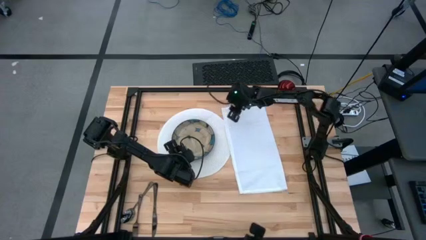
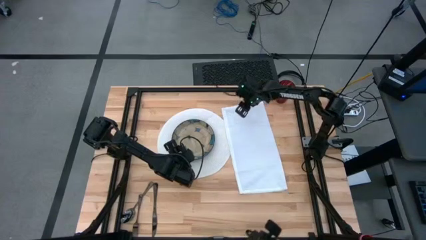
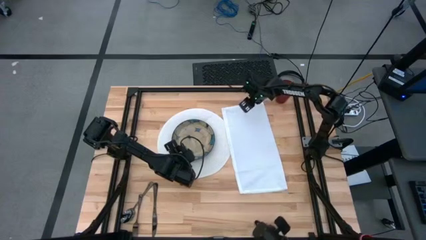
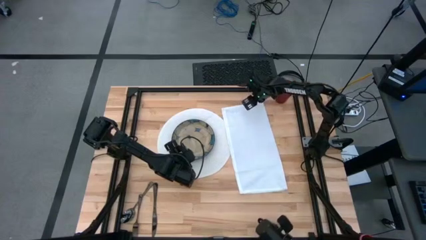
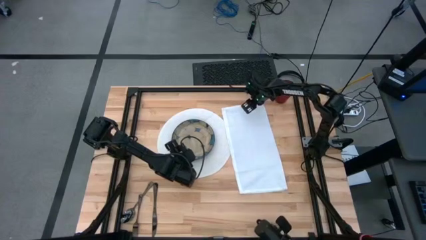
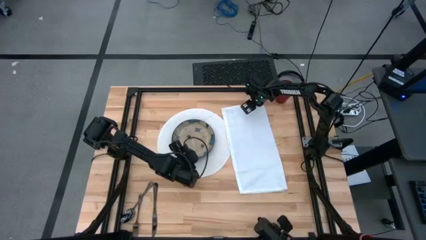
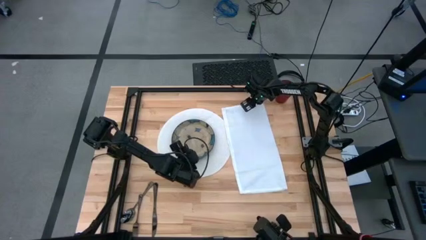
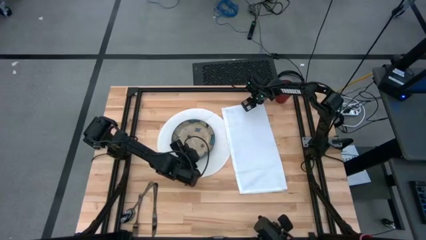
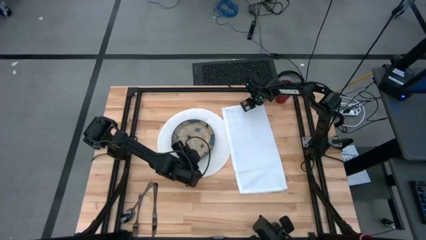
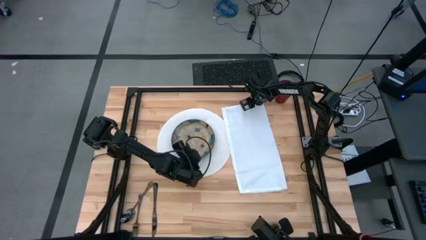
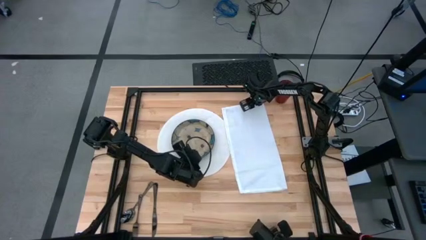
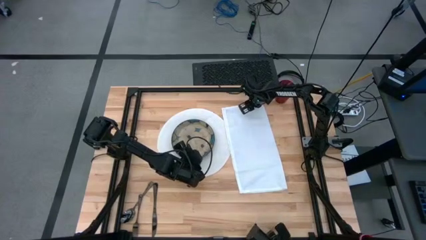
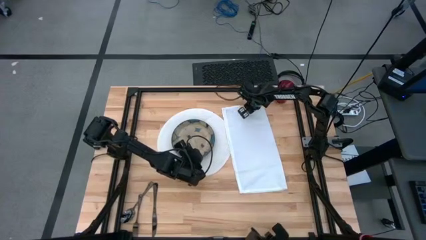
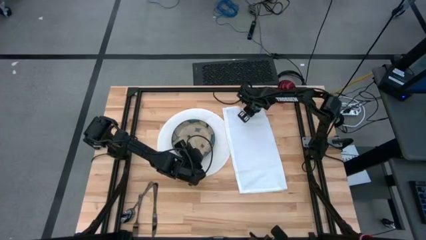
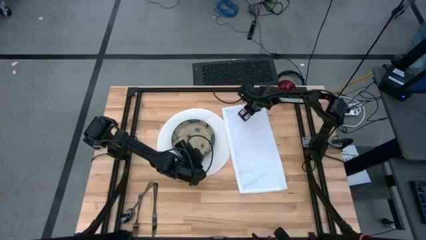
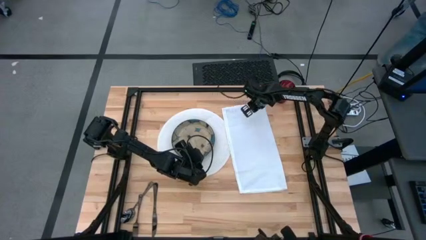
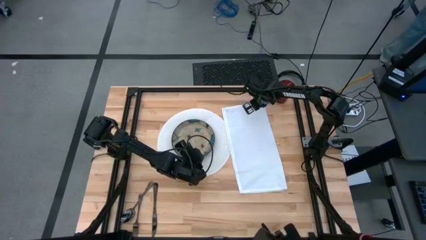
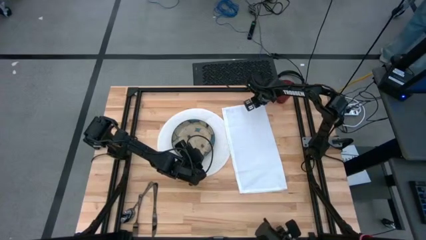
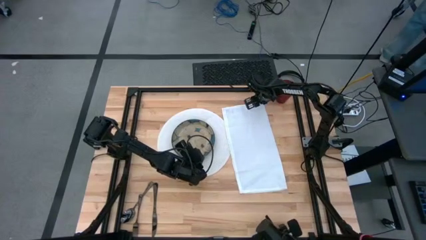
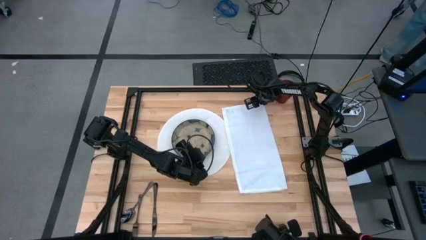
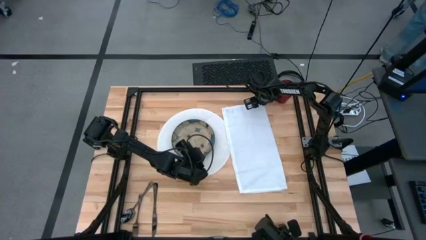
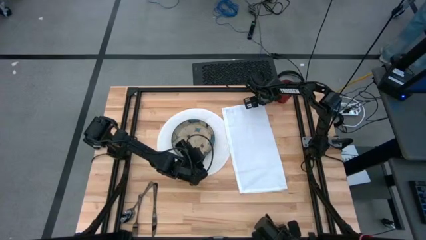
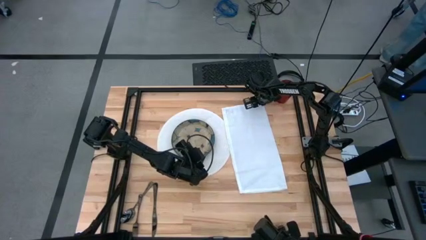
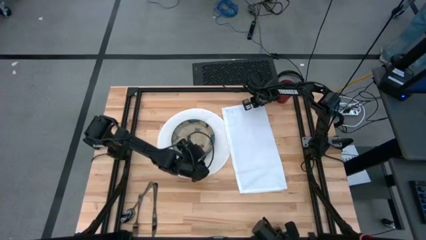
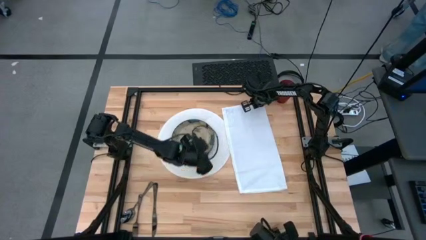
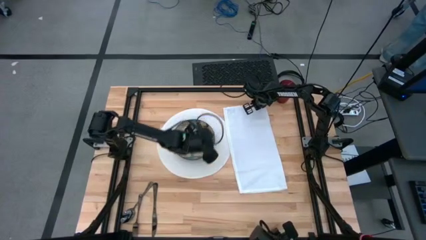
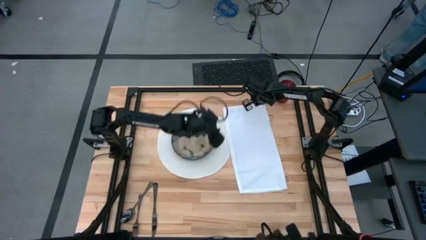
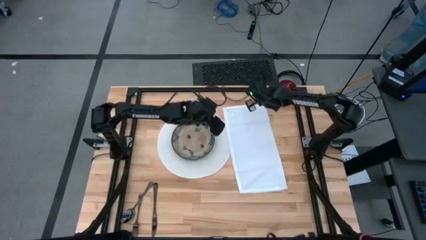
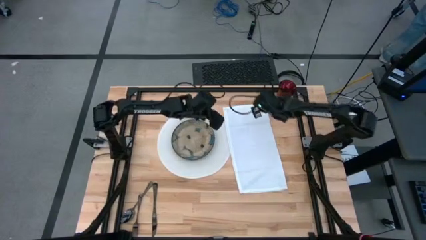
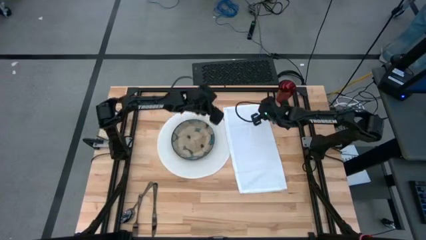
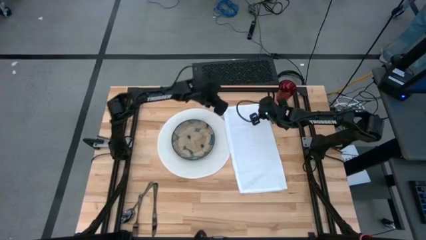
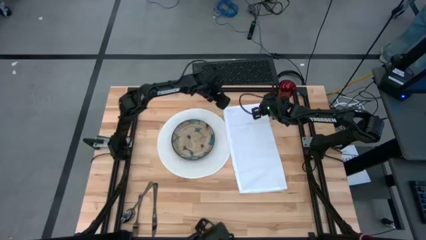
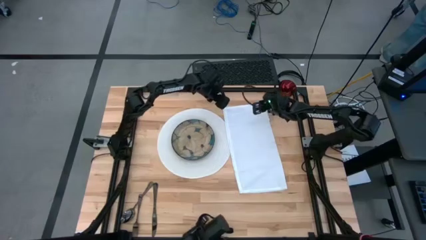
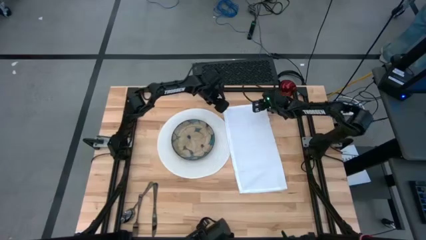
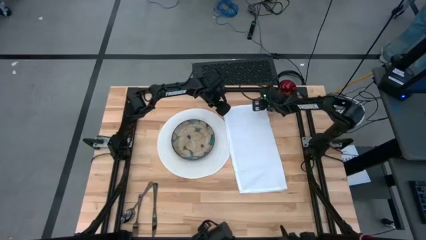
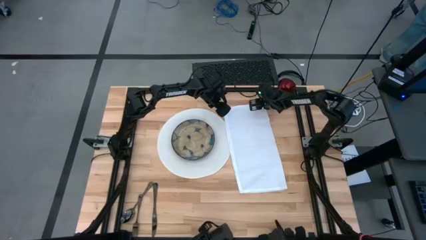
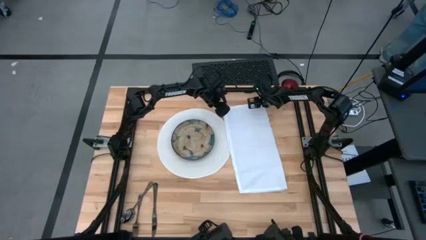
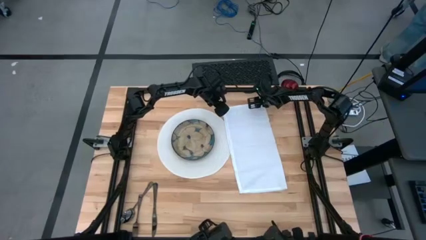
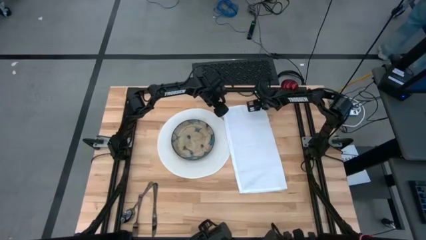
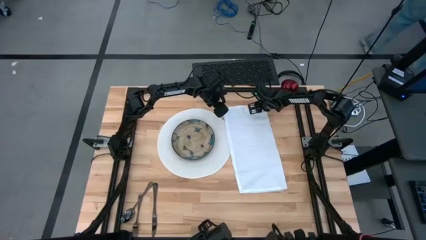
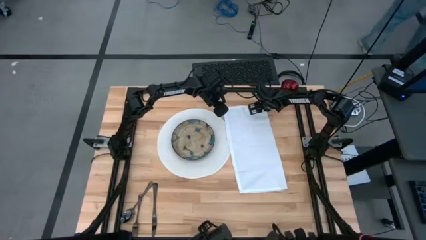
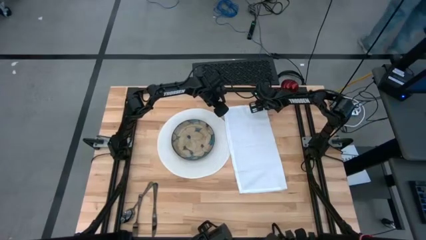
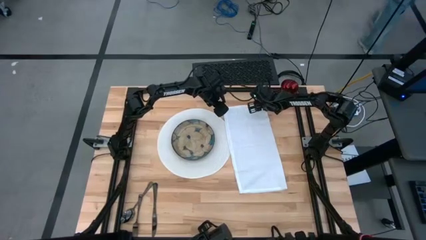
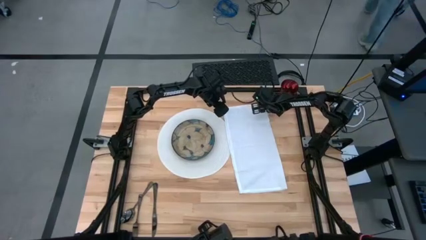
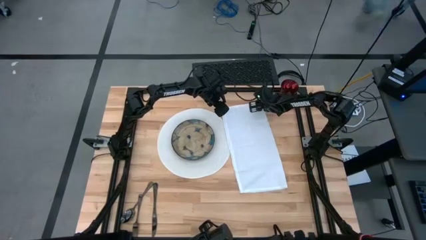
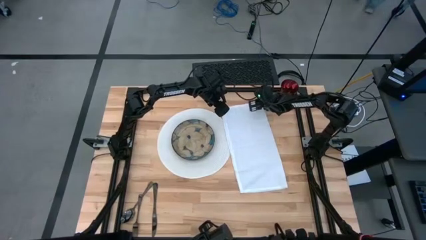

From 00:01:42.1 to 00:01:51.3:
Task: Set table place
Fold the white napkin

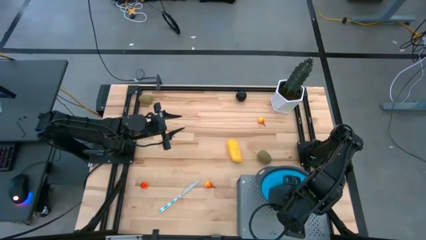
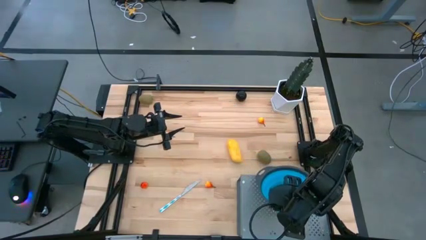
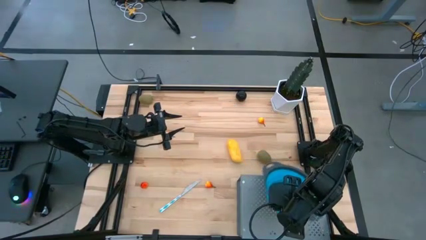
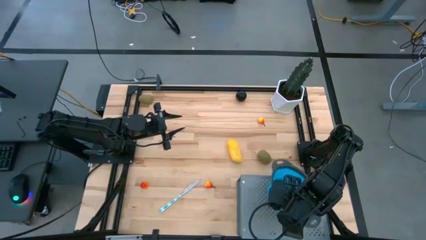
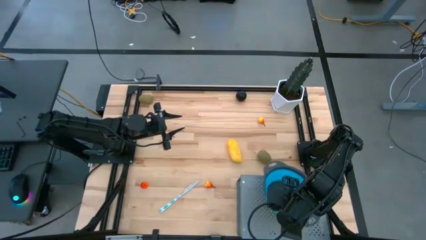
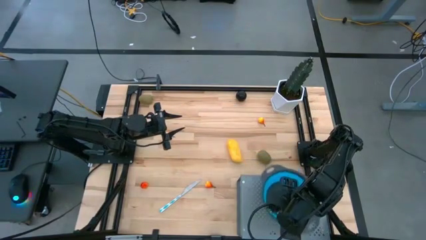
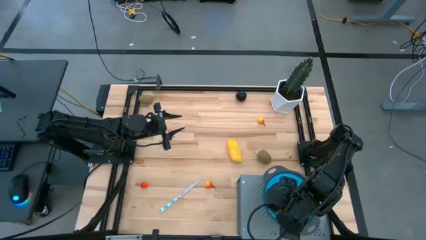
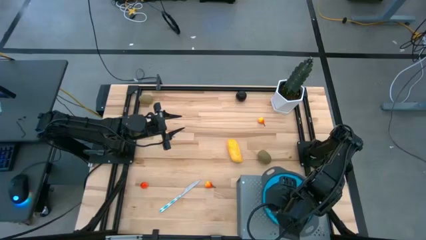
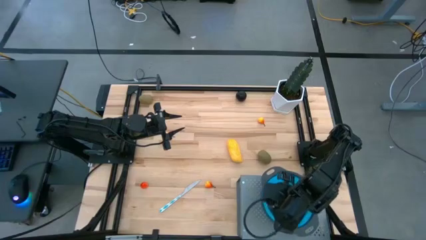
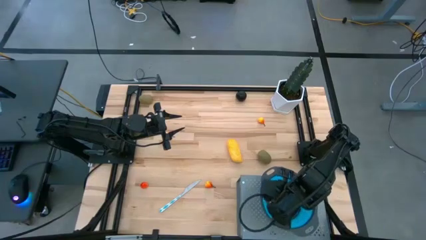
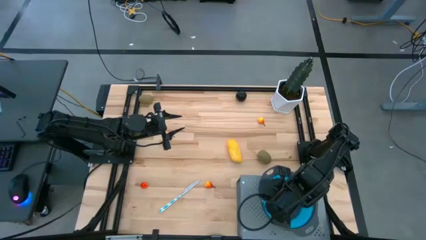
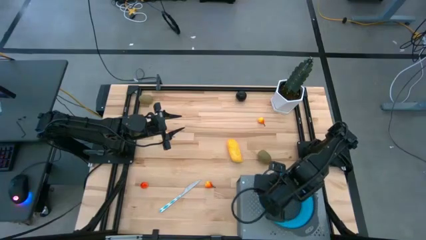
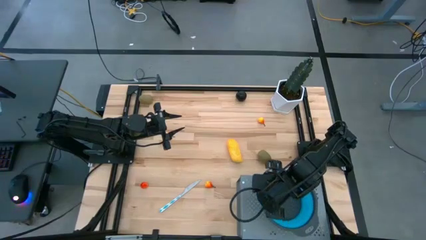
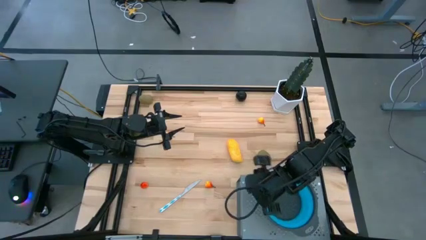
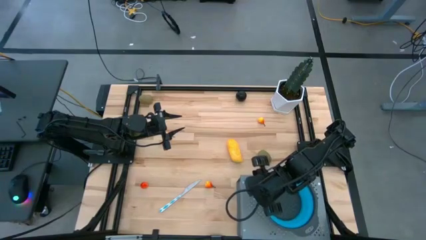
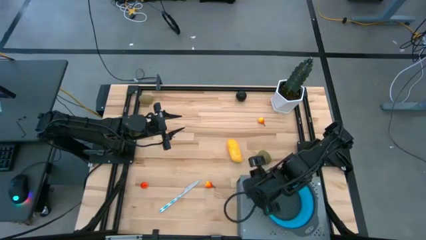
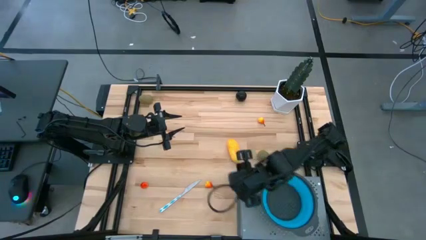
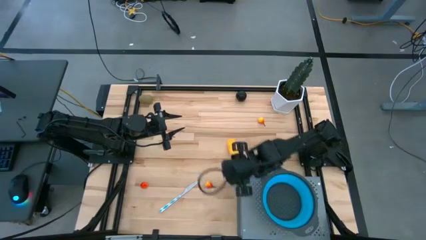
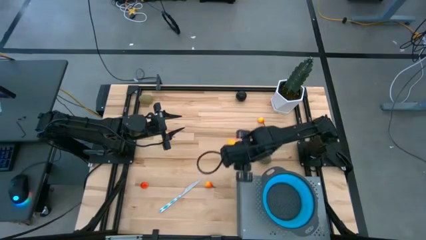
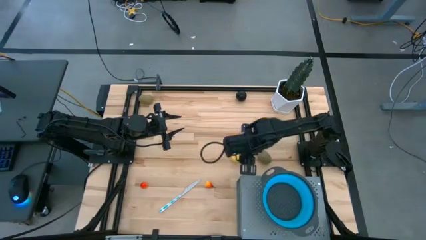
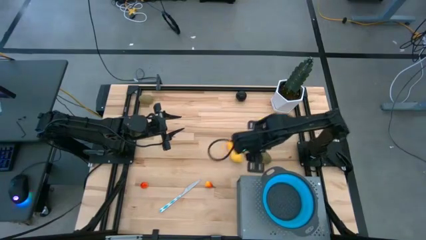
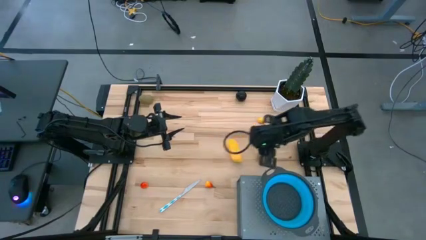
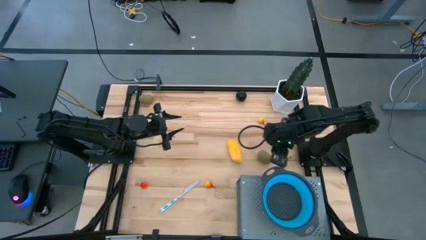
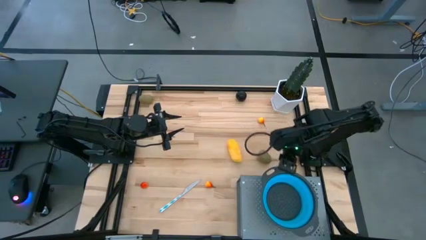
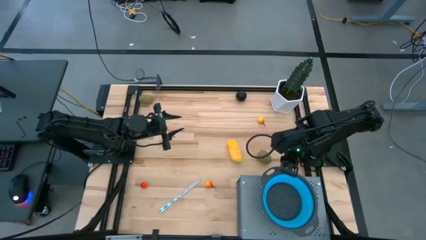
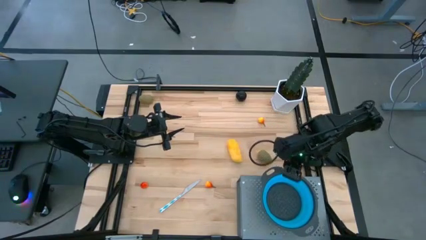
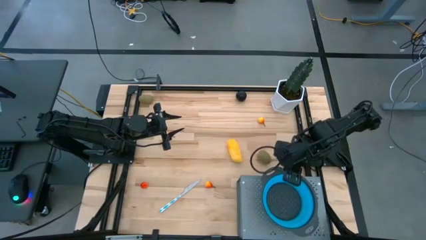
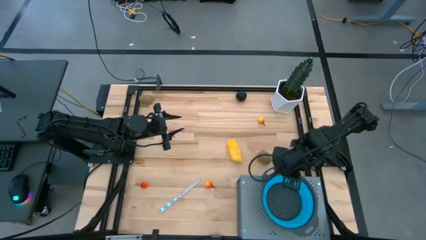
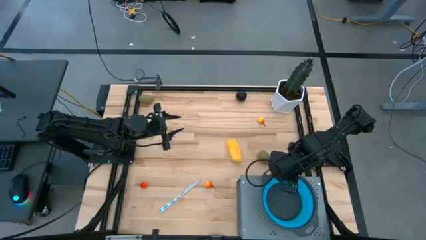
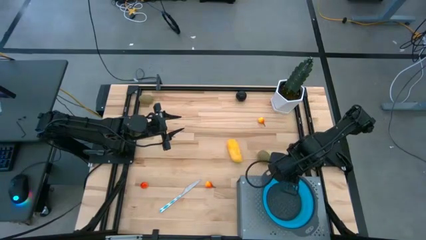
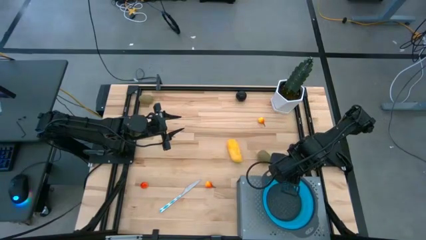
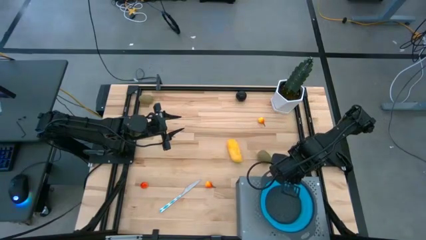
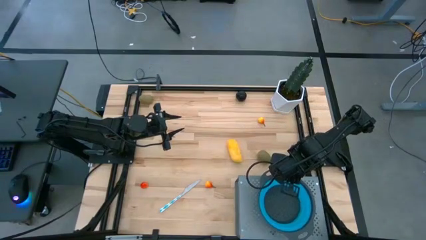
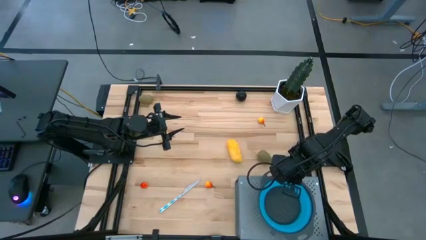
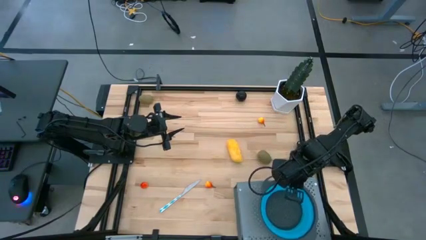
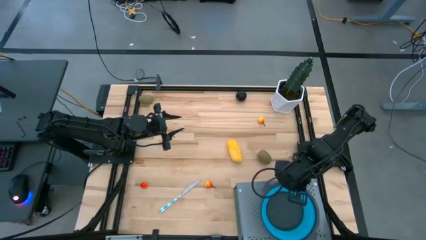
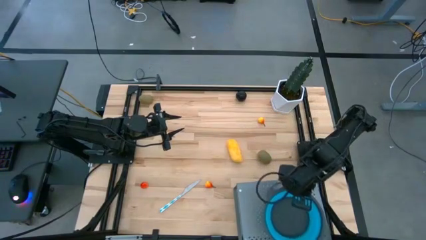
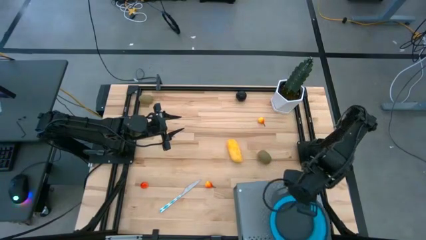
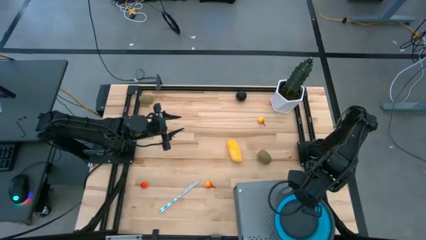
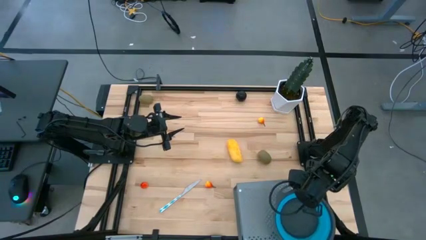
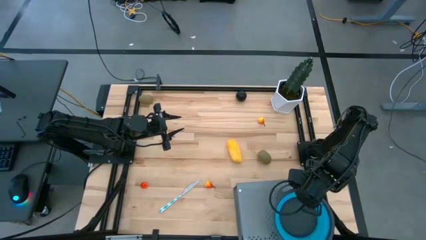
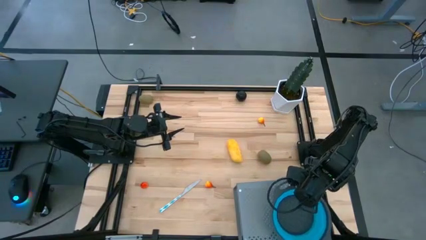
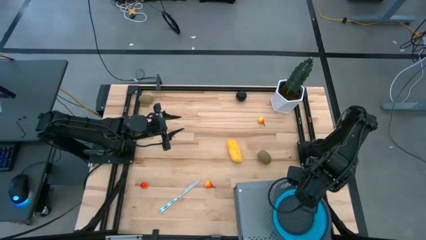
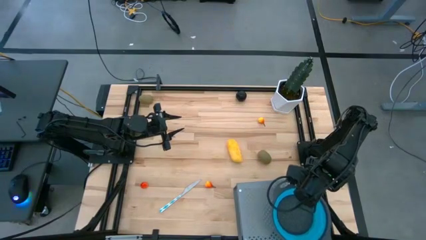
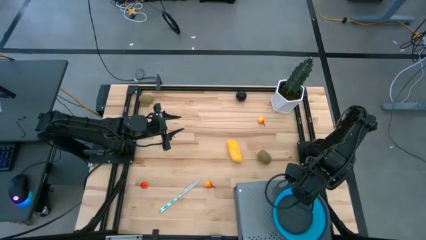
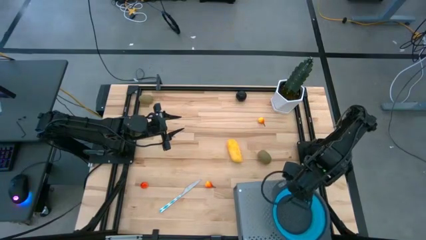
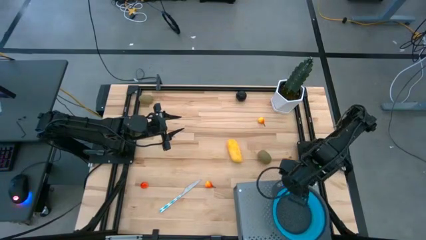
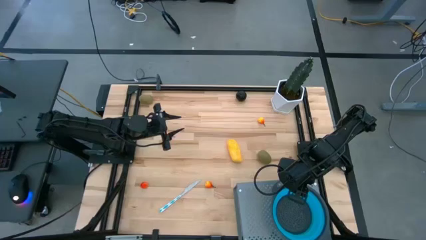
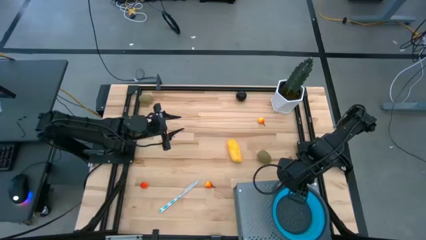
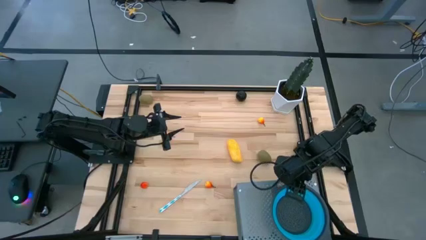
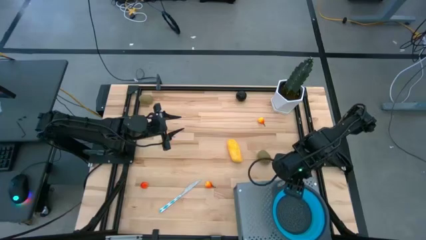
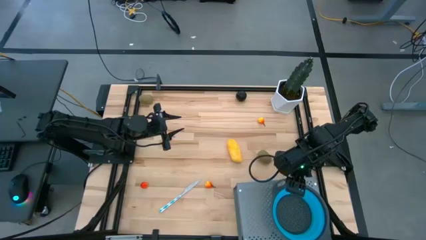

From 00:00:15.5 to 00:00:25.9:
Task: Pick & Place Fruit
Put the blue strainer bowl on the shelf
